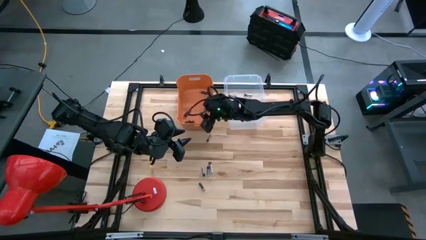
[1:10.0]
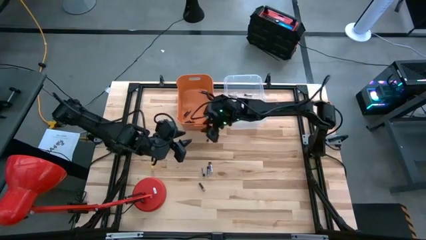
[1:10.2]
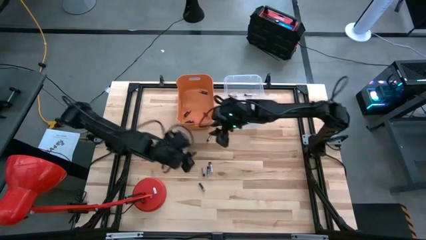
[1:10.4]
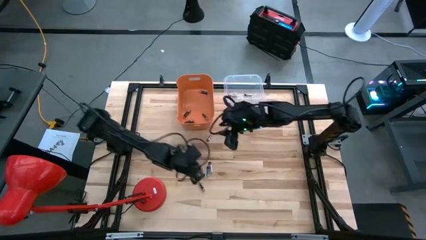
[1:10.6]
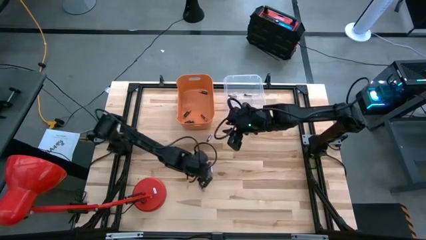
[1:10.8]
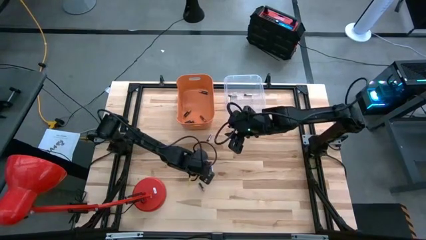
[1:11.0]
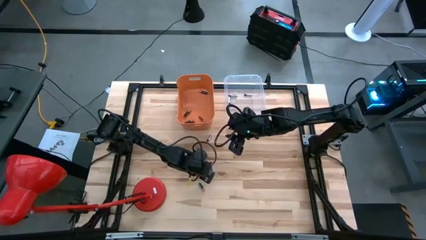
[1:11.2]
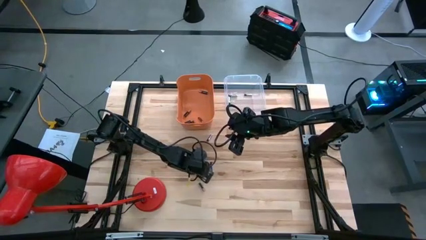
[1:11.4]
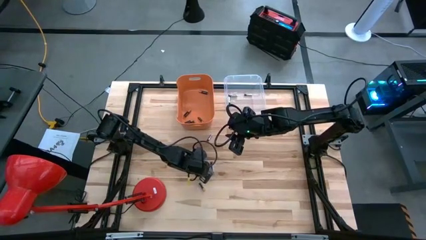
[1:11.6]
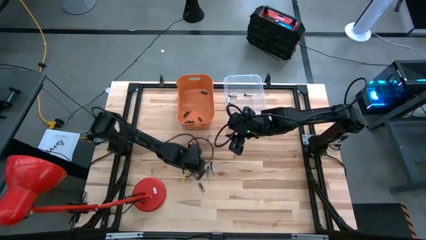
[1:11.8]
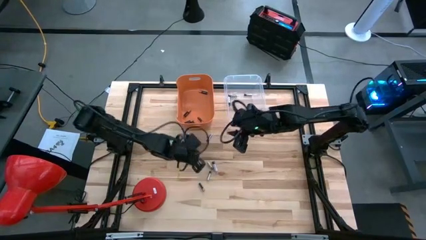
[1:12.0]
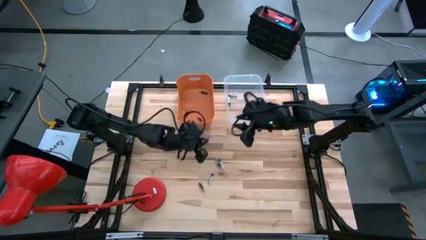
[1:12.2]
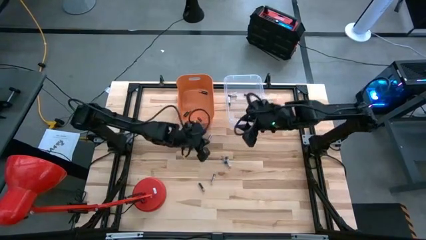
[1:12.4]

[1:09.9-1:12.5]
Task: Sort batteries
Put the silver battery into the transparent bin

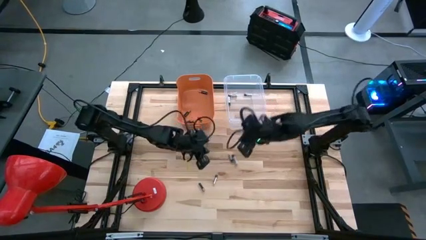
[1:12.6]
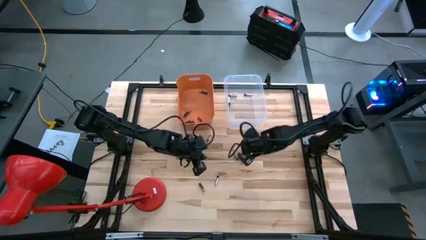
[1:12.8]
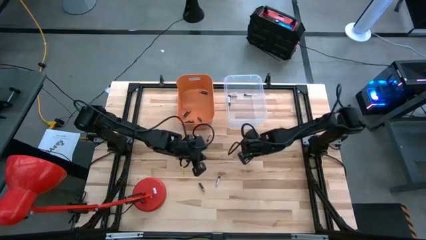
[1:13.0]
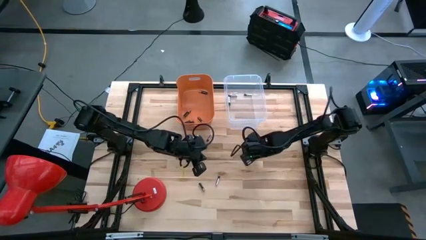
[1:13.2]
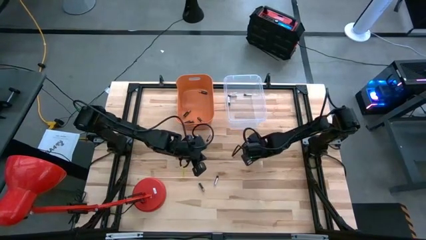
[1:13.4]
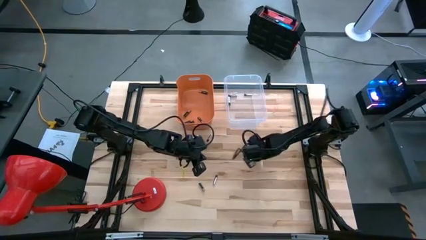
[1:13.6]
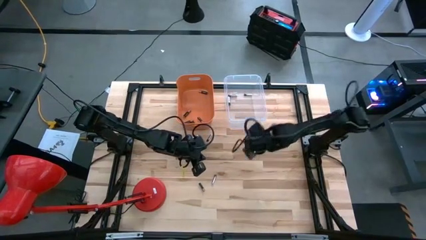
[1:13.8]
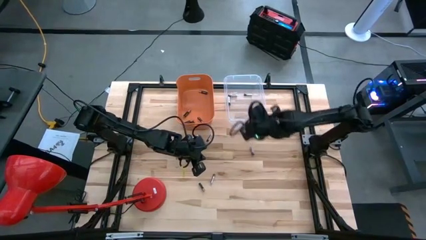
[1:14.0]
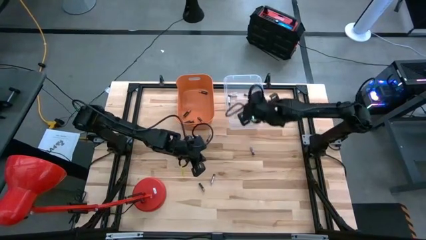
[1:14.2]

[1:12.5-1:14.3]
Put the silver battery into the transparent bin

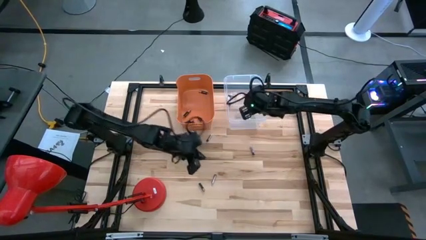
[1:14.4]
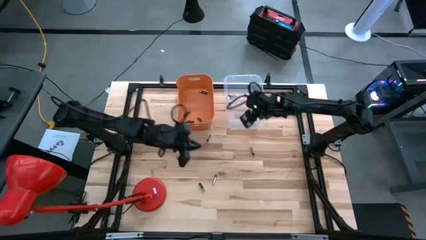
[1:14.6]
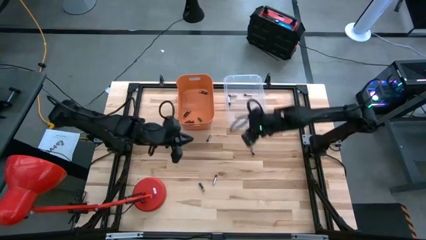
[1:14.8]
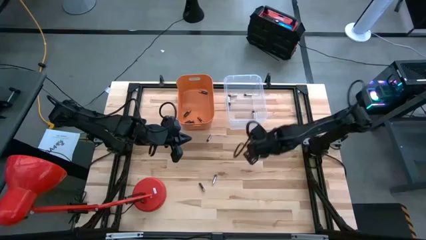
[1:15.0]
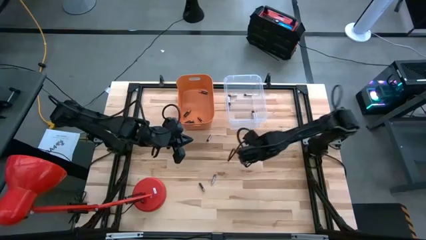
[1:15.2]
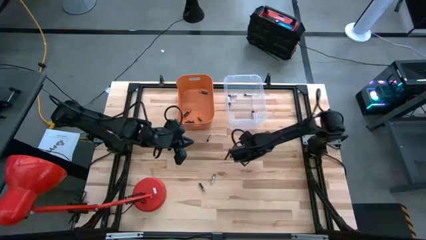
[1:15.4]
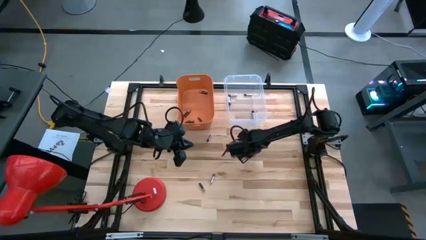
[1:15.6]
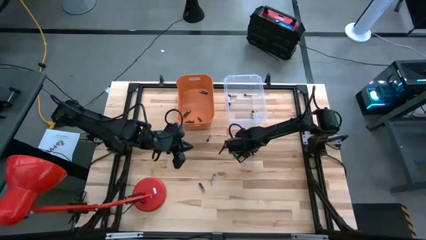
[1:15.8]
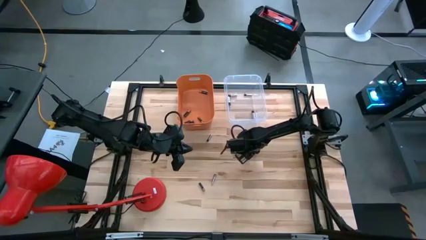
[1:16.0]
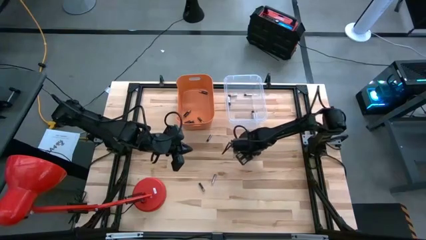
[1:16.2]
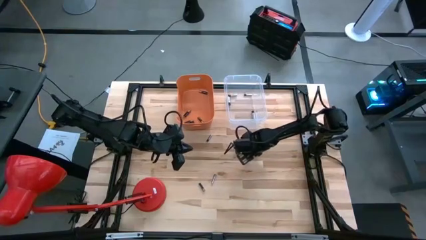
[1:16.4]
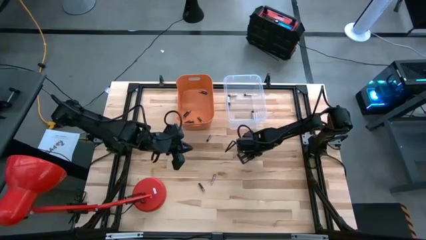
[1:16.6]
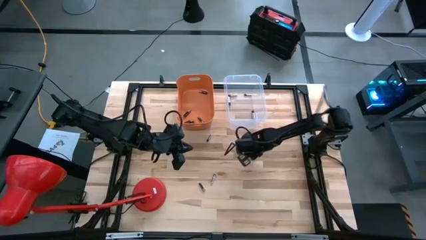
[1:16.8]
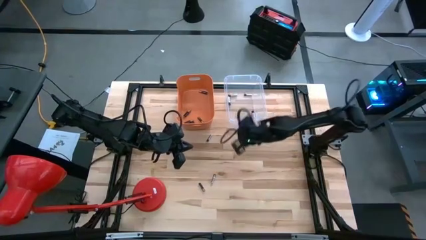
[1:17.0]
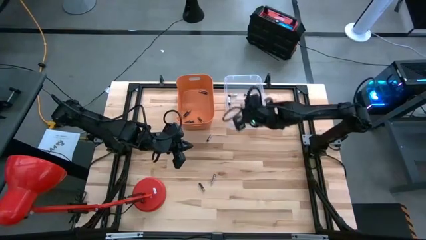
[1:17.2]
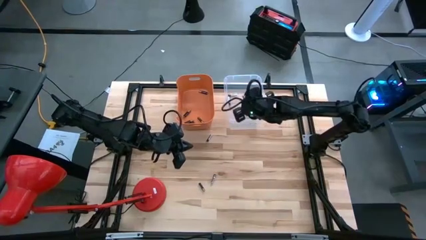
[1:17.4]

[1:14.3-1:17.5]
Put the silver battery into the transparent bin

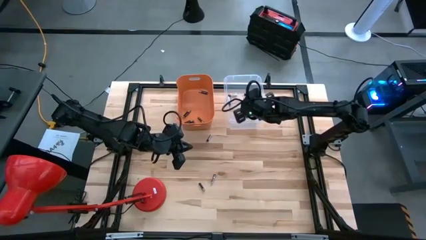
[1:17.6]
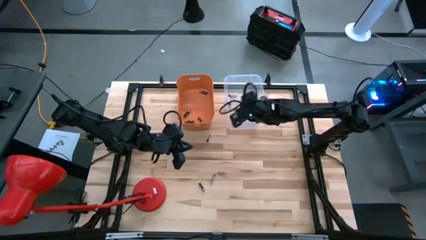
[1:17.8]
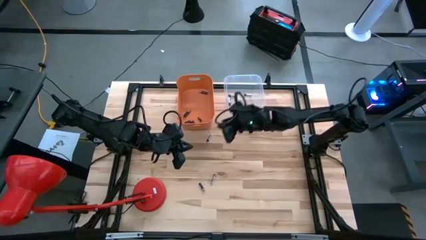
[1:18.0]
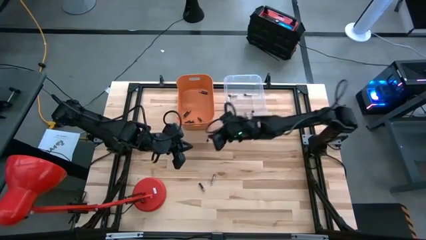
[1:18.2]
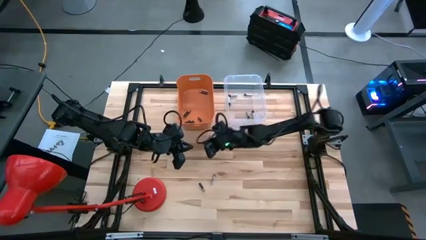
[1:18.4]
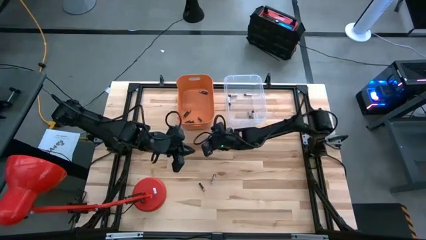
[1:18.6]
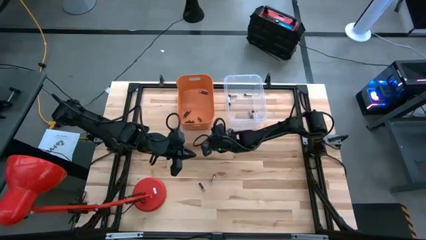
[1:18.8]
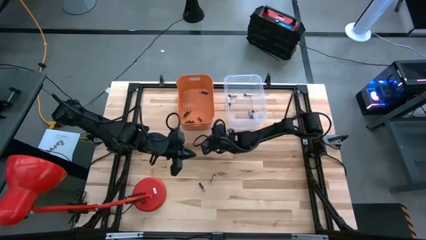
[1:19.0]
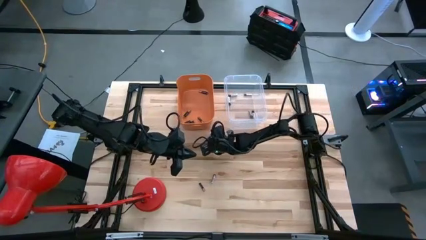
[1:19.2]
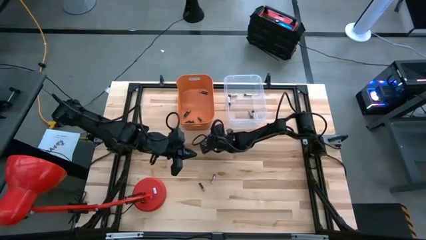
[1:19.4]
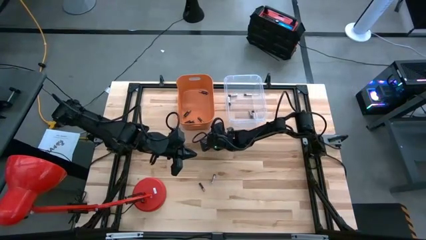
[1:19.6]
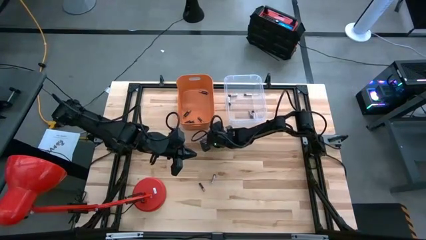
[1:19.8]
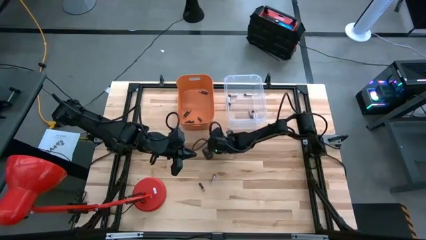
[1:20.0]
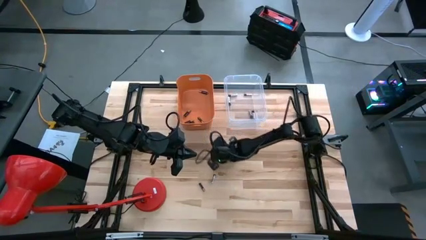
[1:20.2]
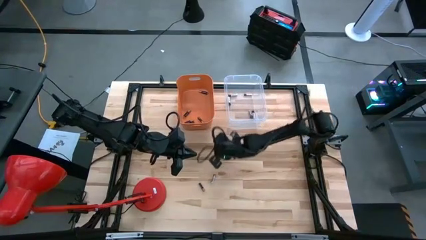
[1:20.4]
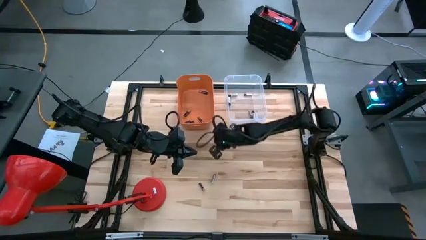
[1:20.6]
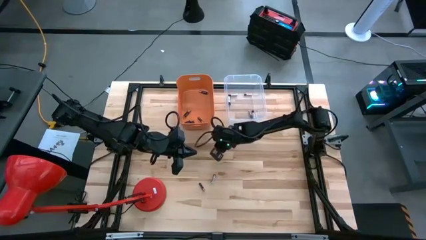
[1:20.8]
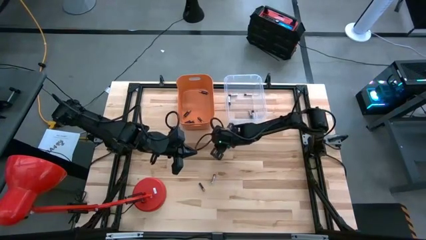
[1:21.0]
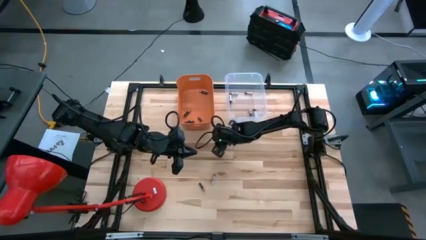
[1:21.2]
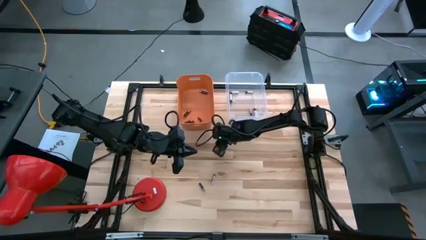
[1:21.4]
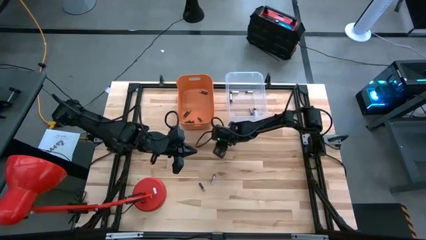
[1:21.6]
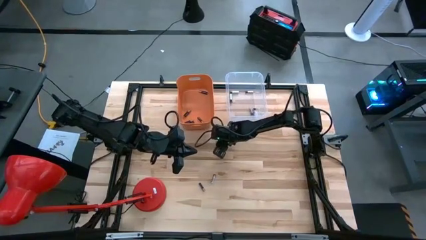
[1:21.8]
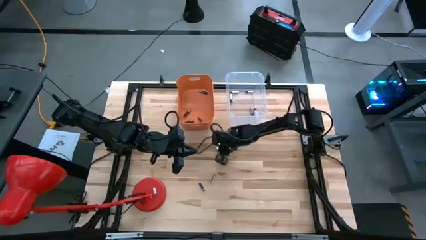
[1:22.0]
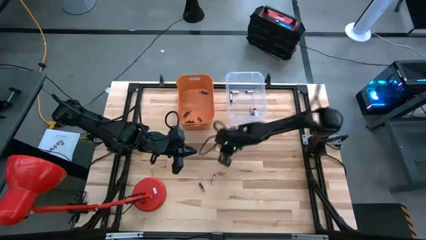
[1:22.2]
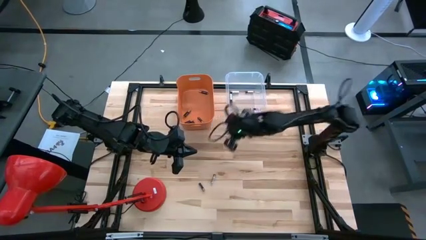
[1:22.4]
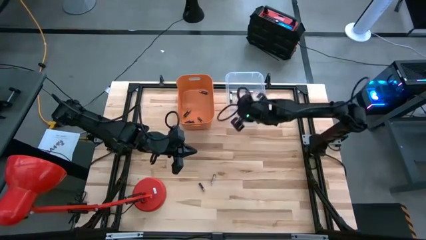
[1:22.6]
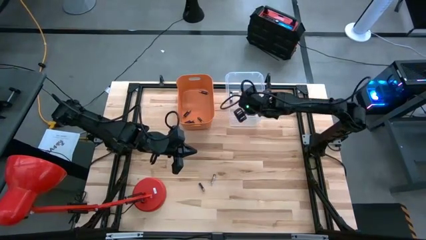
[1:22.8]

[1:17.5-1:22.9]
Put the silver battery into the transparent bin

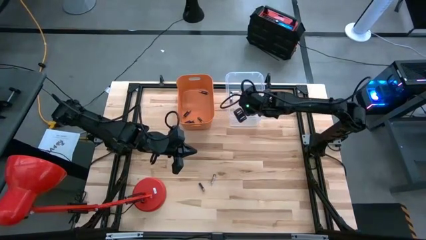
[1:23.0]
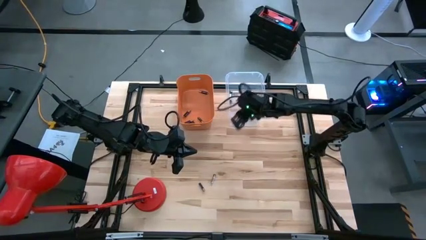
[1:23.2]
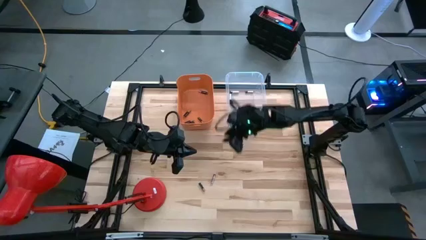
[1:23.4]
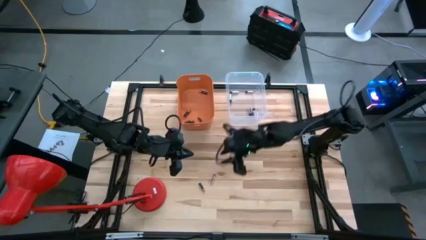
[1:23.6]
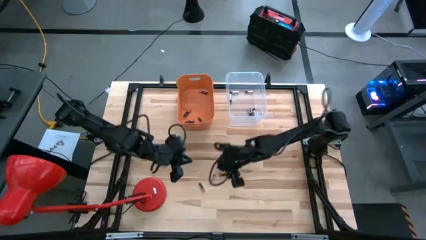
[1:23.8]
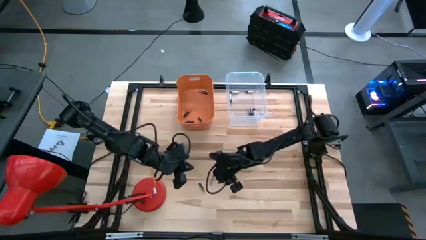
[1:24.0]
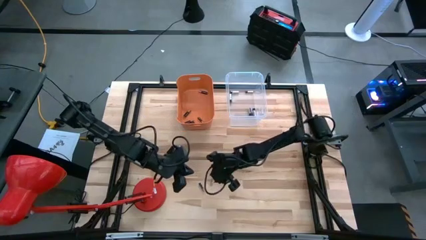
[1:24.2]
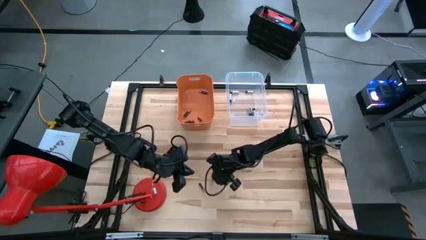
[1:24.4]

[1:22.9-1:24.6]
Put the silver battery into the transparent bin

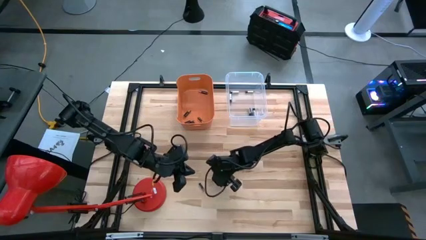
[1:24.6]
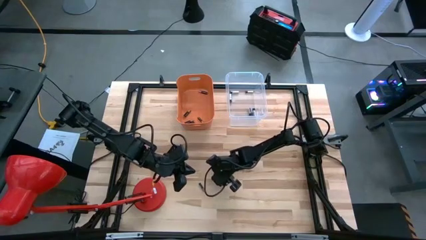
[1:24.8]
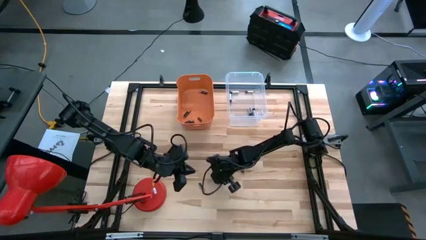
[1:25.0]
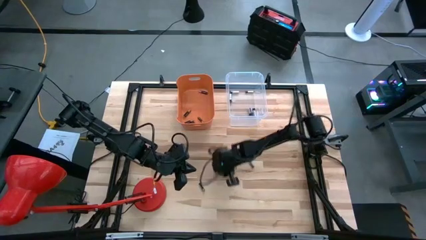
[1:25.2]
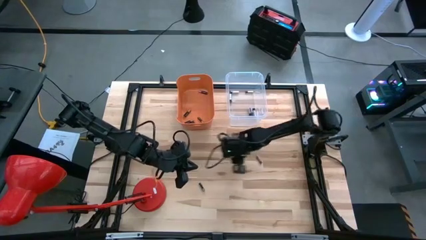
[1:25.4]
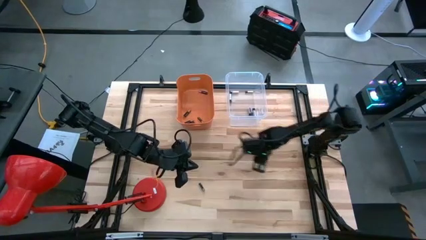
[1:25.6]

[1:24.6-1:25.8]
Put the silver battery into the transparent bin

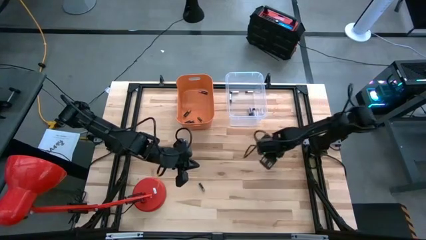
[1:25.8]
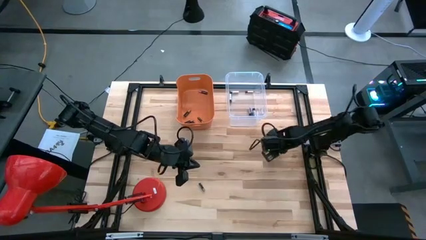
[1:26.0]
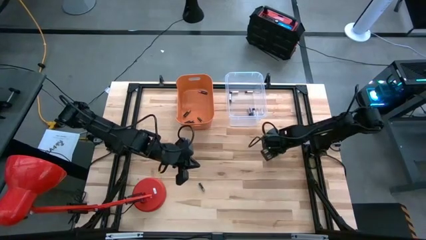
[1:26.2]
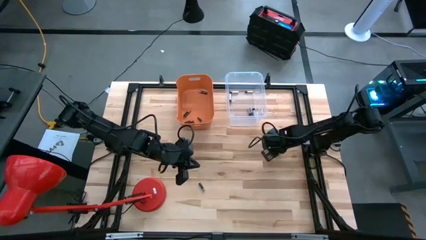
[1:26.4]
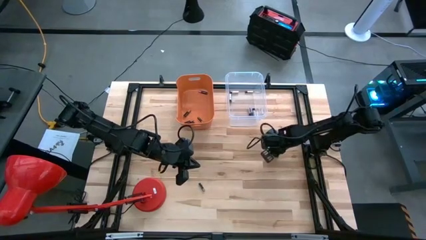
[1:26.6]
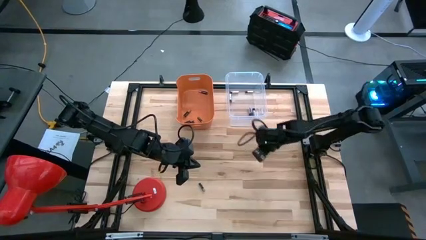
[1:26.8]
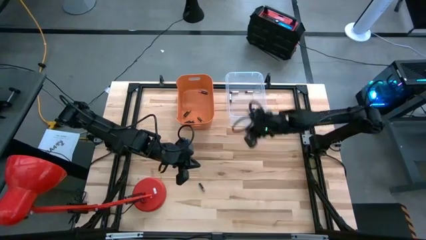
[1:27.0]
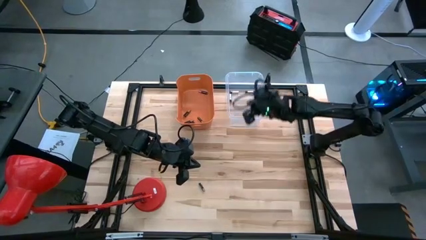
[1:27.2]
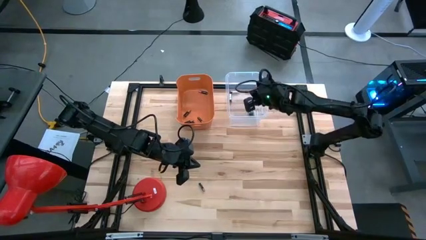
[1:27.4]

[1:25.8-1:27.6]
Put the silver battery into the transparent bin
